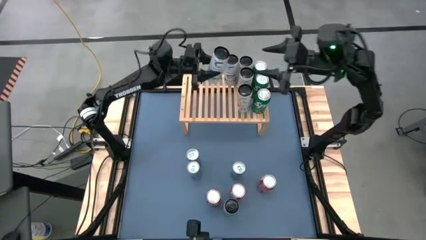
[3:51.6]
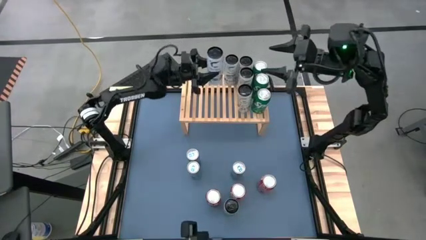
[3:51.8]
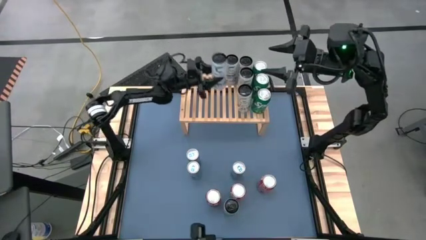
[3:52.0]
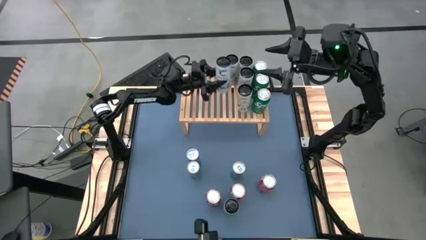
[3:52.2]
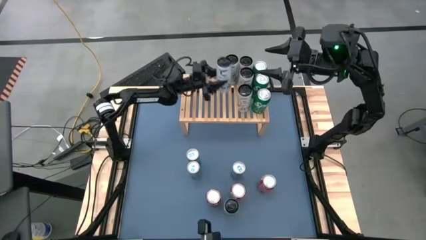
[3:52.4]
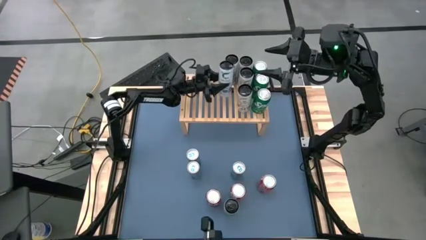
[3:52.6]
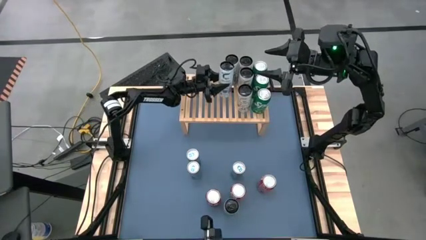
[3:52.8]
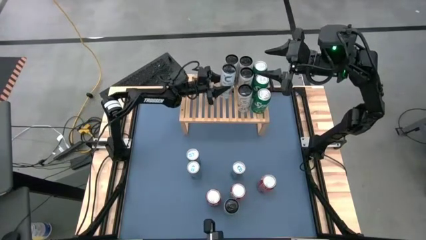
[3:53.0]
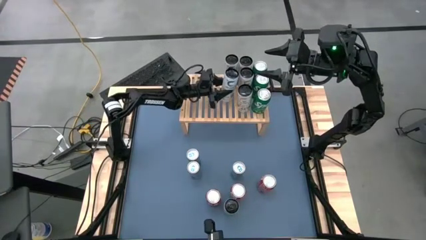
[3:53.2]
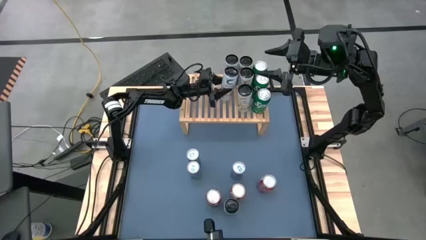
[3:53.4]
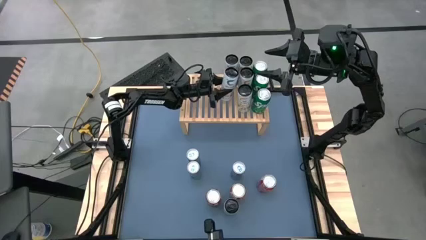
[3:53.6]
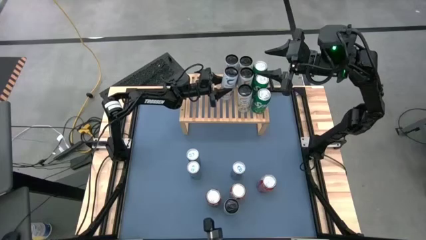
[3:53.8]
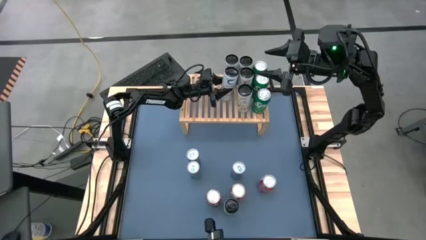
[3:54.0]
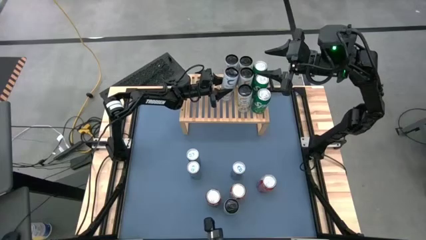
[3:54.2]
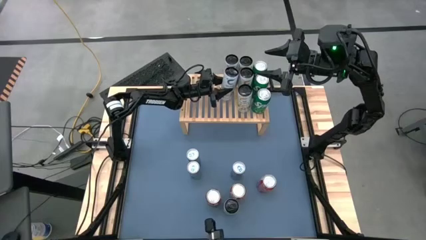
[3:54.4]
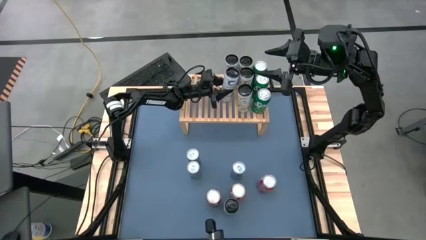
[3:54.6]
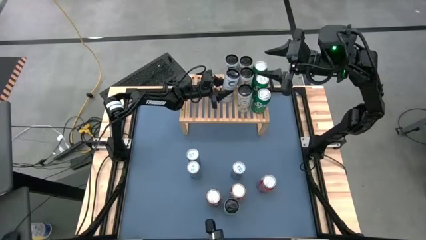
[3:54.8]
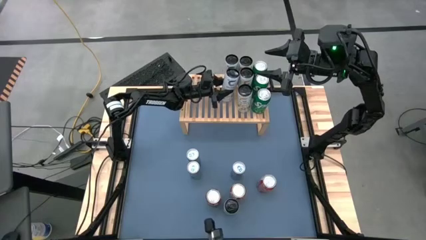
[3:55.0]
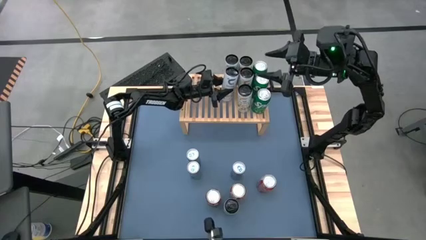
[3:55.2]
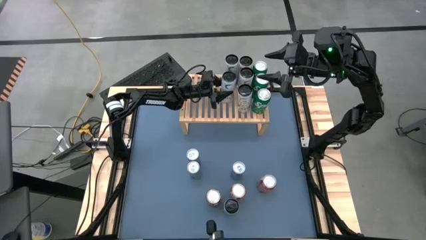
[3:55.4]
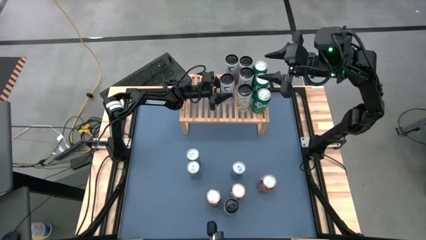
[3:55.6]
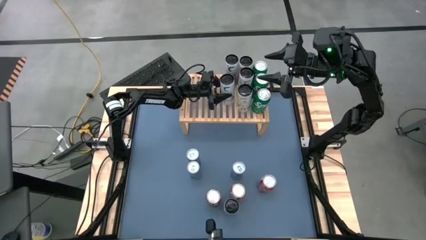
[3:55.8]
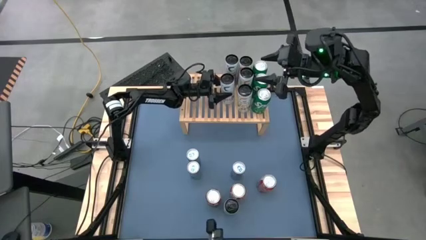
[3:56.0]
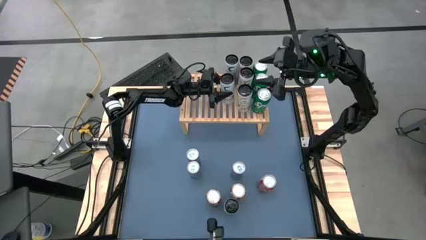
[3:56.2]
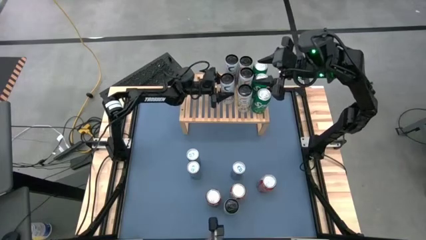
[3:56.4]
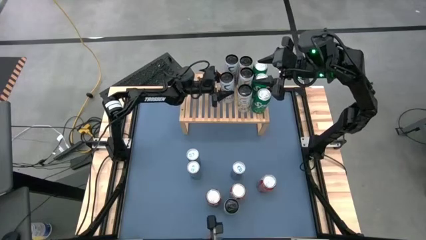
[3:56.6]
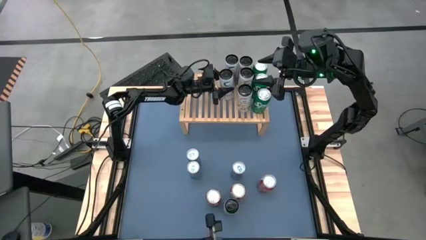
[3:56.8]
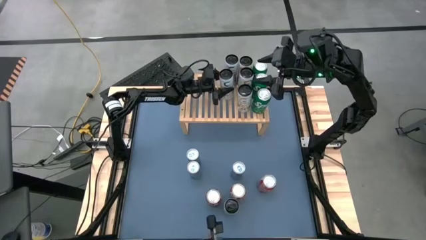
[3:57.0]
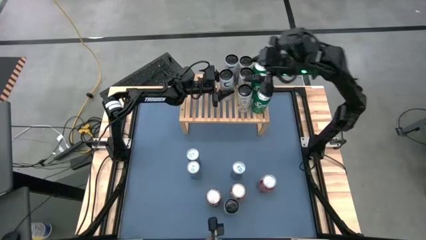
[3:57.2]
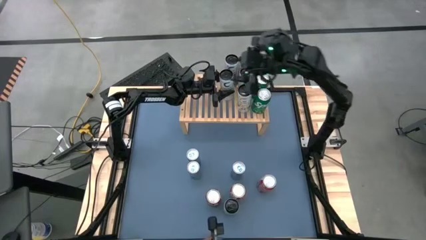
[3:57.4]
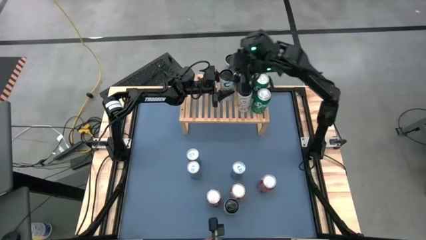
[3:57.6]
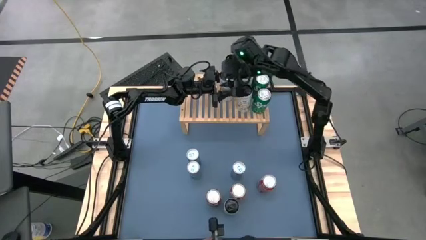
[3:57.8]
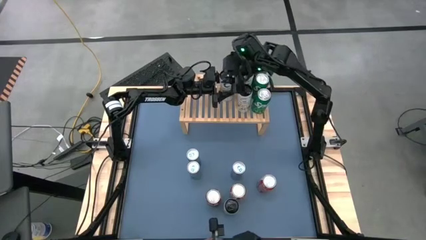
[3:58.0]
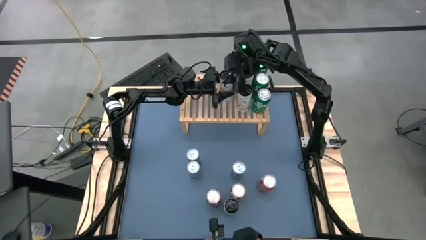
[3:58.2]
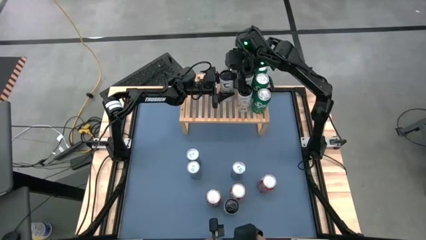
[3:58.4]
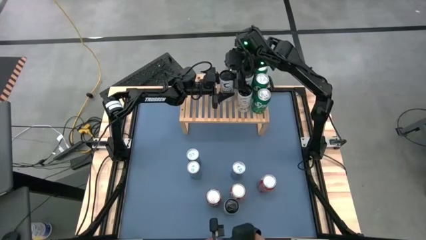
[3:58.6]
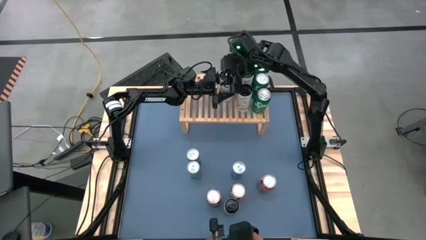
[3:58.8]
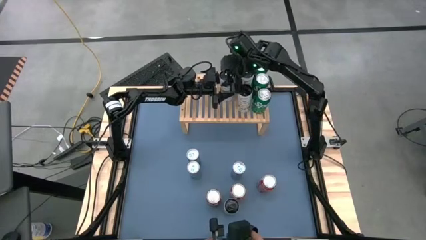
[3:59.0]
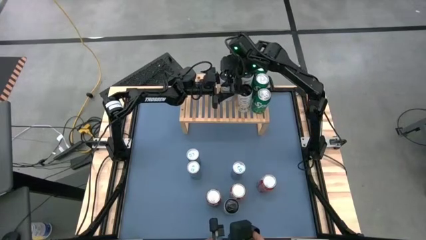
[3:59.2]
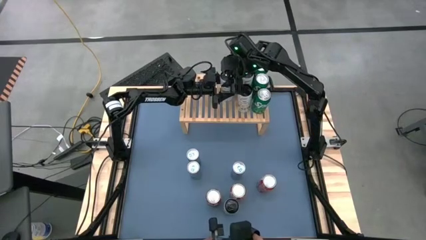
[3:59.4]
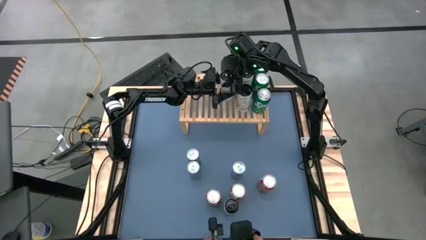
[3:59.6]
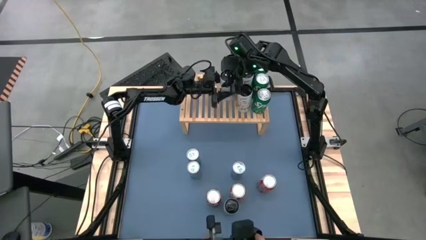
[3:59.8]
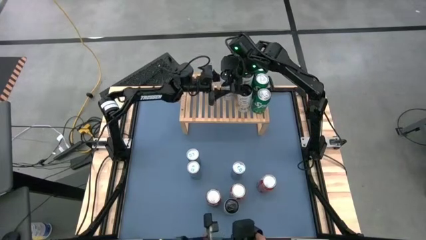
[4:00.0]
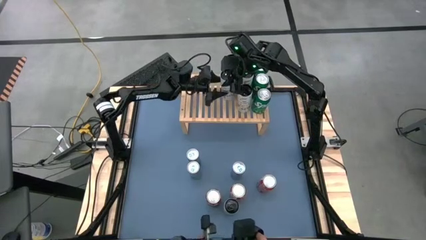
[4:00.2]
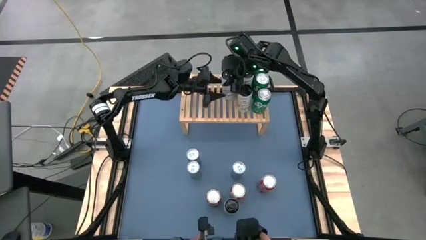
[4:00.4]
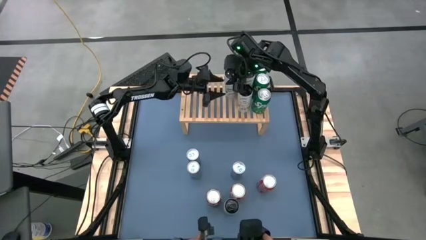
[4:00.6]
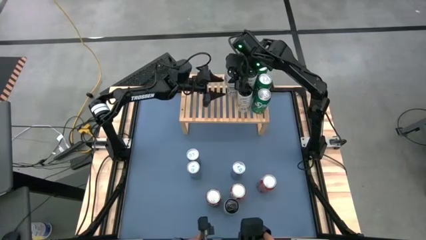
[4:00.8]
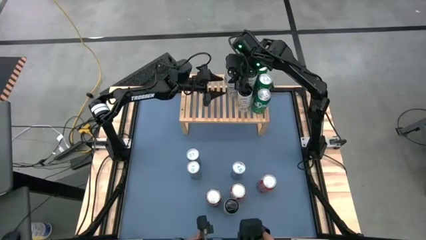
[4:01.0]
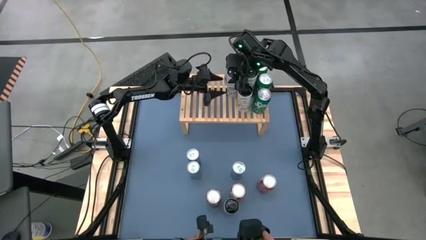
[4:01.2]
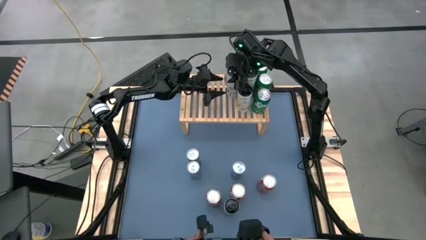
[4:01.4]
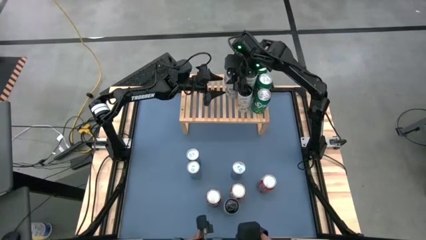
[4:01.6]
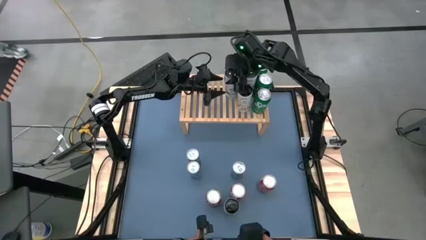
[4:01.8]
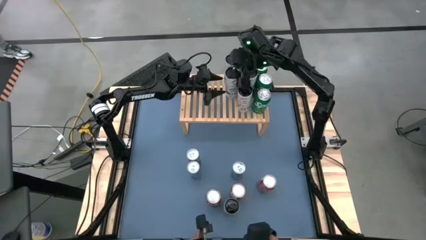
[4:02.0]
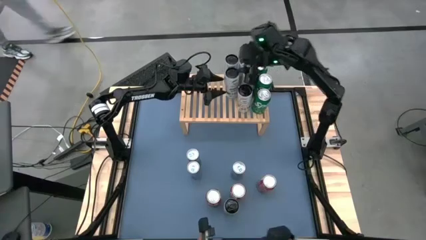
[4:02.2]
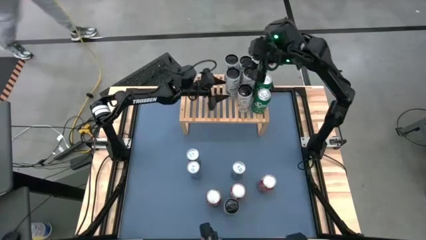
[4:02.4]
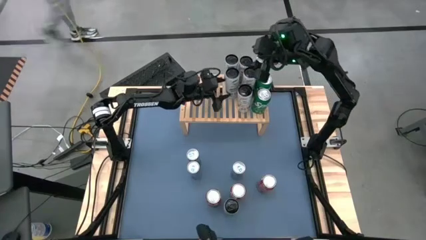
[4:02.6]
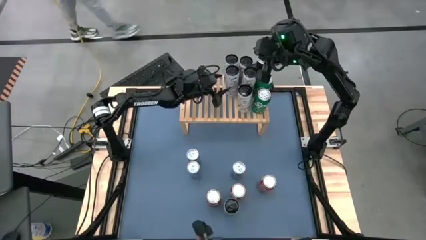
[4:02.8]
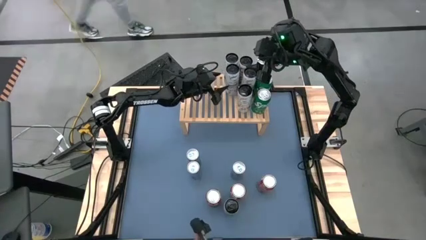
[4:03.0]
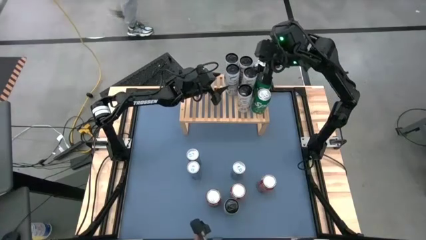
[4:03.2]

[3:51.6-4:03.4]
Task: Place canned beverage on shelf
Put the right white-blue soda can on the shelf aligned with the other white-blue soda can

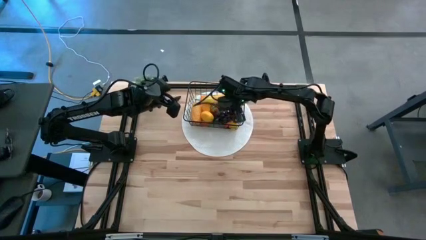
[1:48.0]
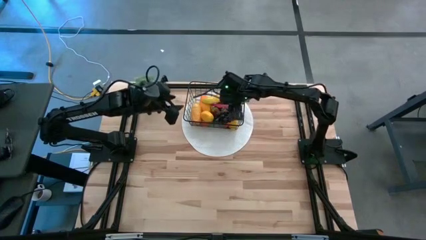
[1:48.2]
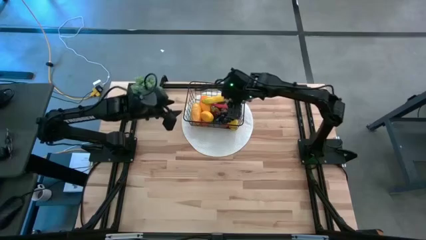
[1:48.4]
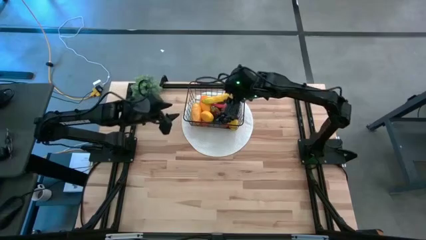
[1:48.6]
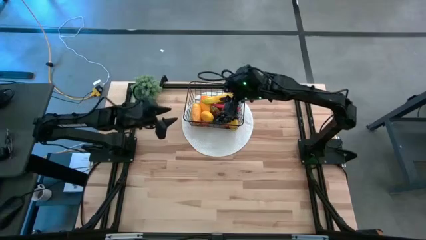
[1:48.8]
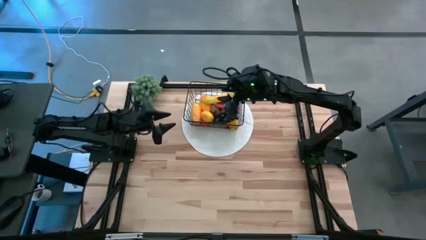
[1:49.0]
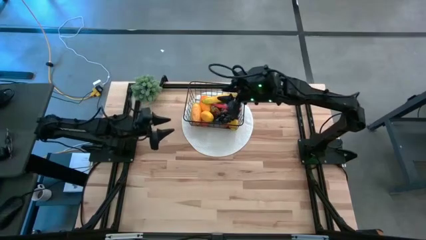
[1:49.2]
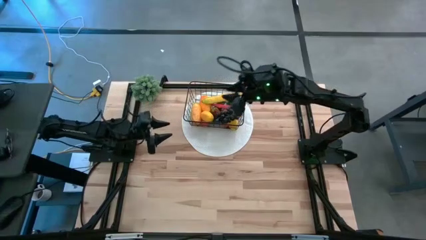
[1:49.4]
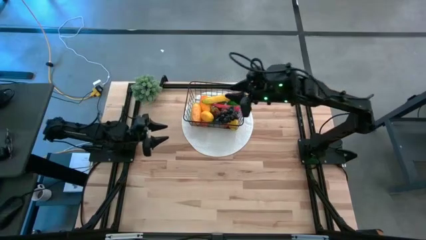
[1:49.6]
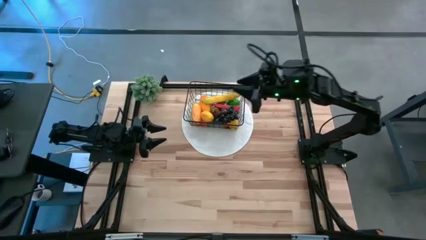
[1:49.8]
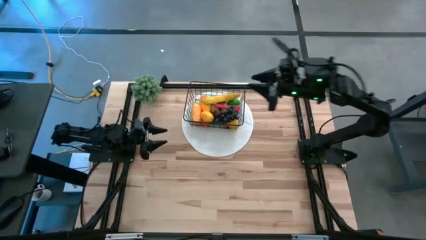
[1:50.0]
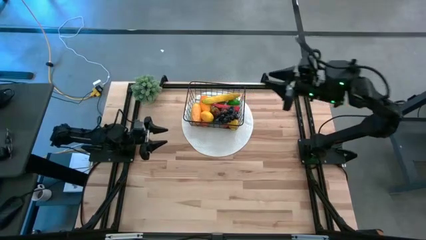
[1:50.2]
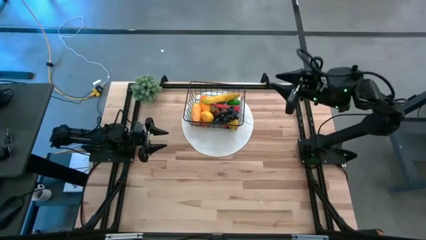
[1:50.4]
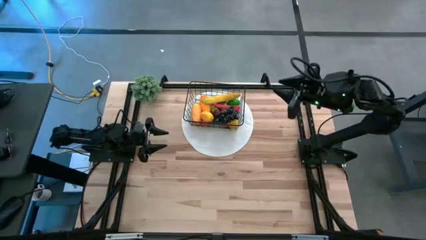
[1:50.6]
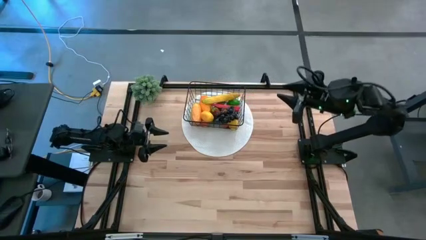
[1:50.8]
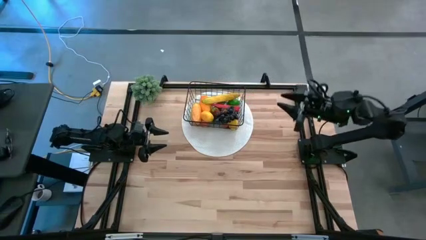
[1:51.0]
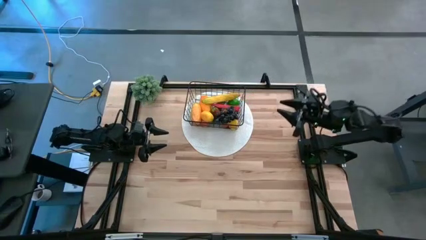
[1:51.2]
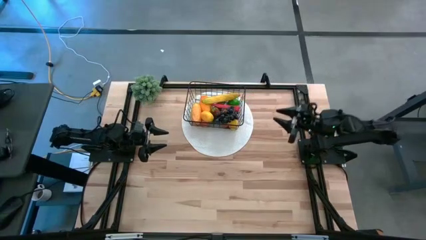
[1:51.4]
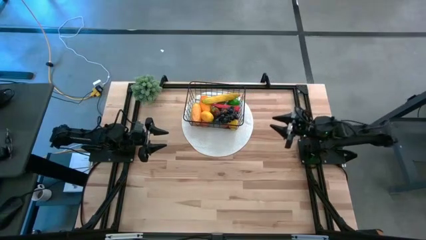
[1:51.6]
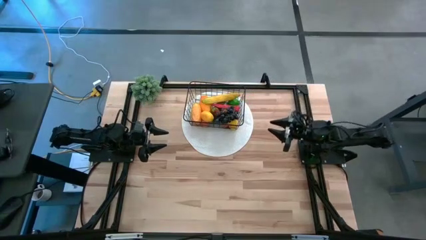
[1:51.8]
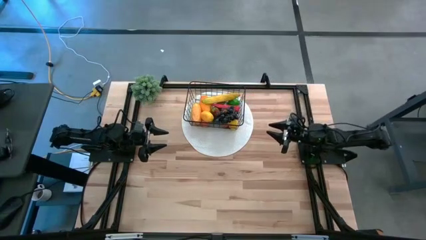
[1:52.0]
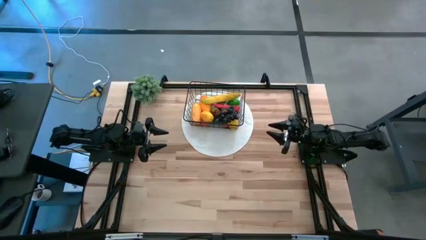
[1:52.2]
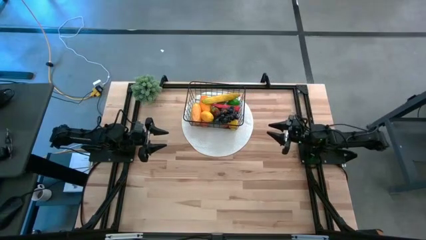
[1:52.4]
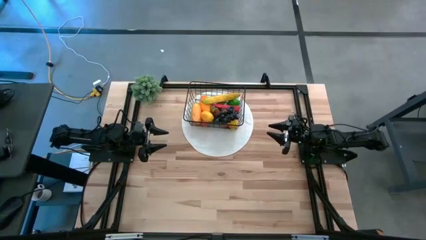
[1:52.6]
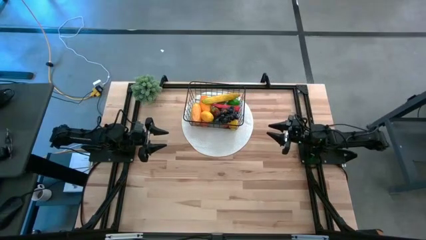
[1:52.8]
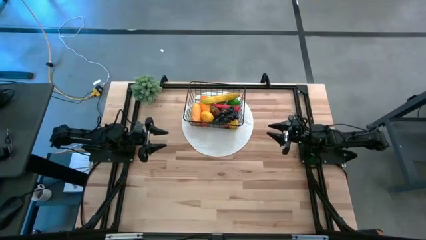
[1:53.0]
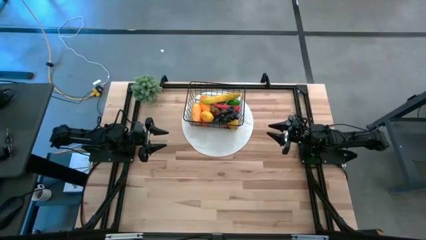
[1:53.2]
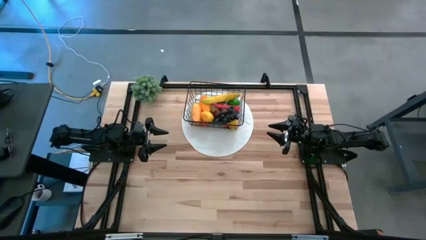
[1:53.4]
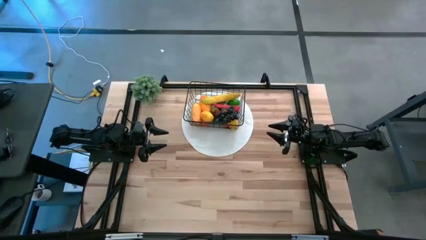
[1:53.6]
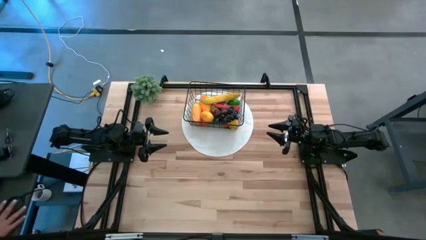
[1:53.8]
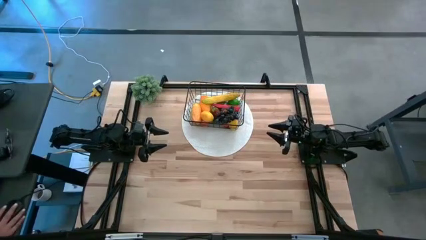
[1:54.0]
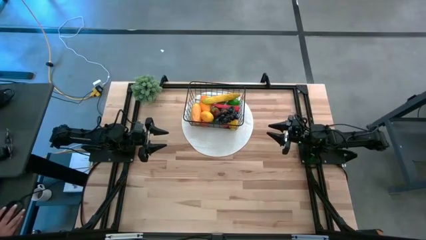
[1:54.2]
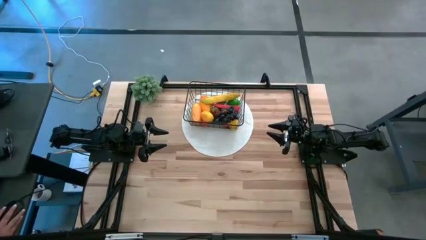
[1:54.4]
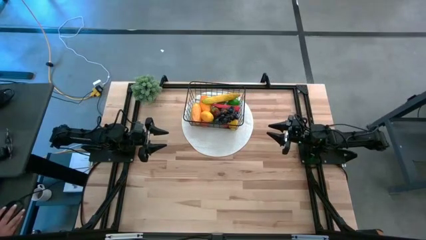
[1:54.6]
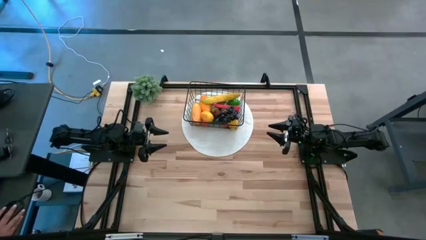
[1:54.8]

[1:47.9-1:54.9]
Task: Build produce basket
Return to Home Position
